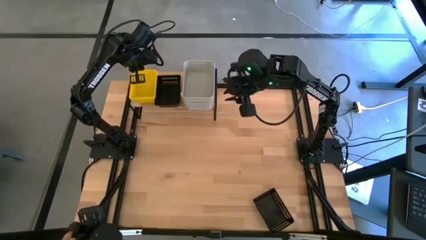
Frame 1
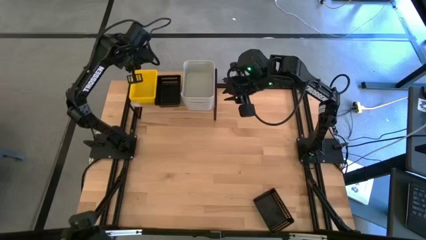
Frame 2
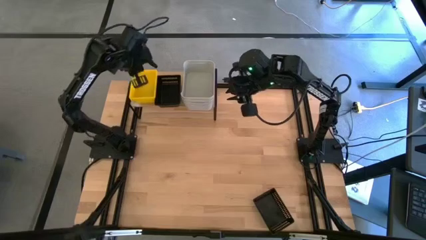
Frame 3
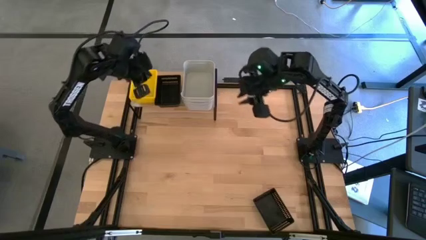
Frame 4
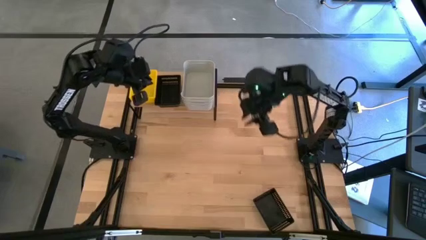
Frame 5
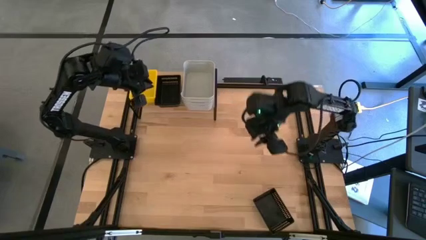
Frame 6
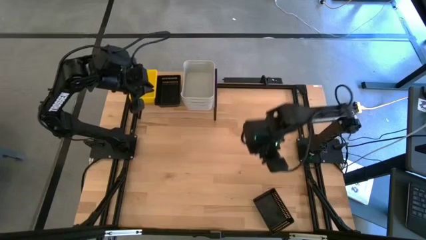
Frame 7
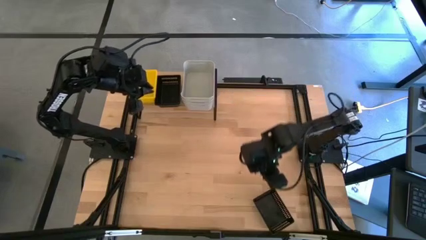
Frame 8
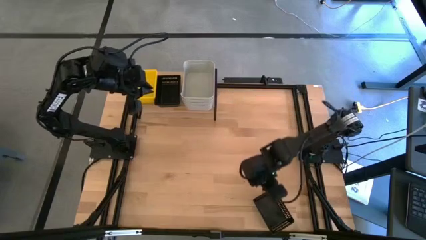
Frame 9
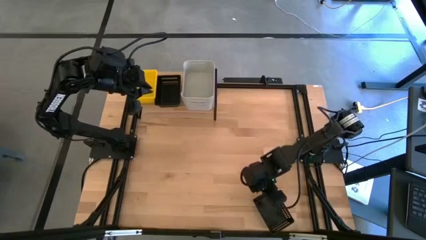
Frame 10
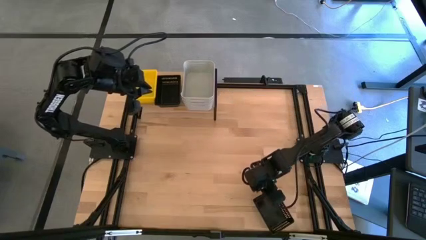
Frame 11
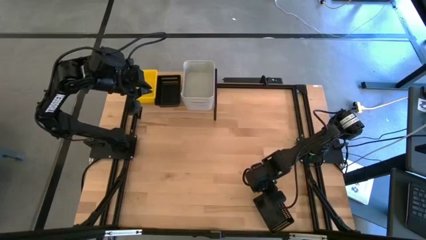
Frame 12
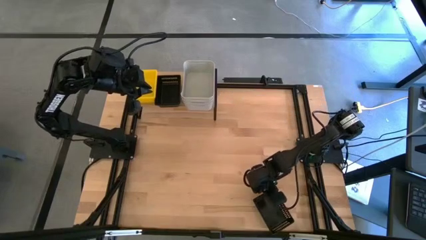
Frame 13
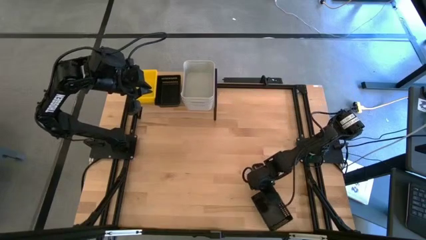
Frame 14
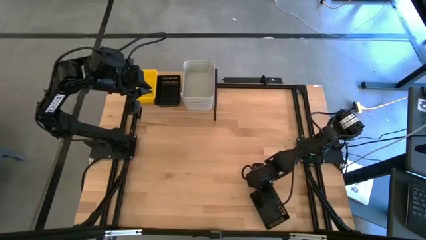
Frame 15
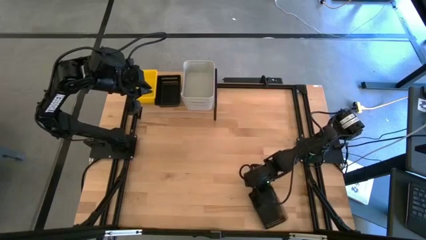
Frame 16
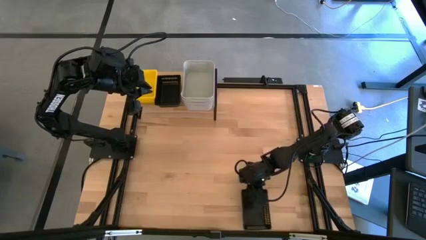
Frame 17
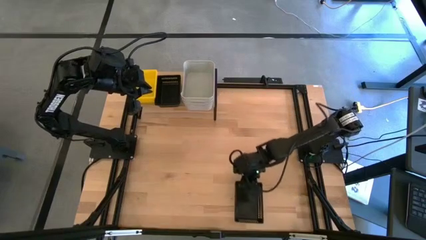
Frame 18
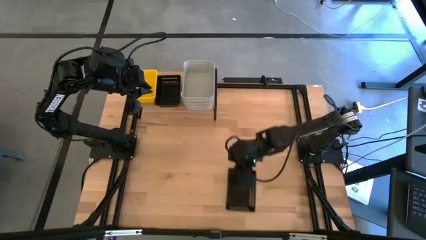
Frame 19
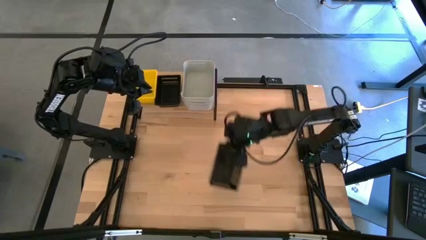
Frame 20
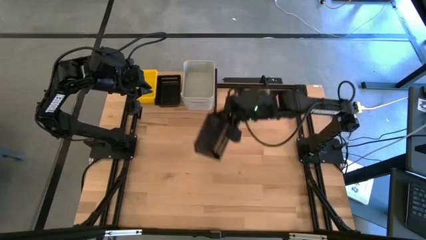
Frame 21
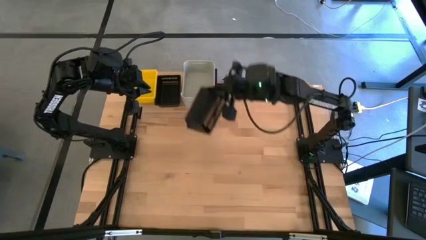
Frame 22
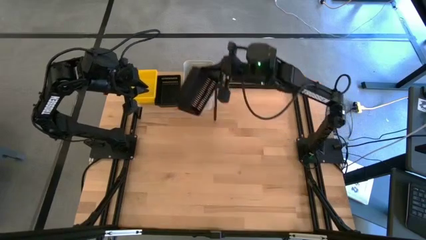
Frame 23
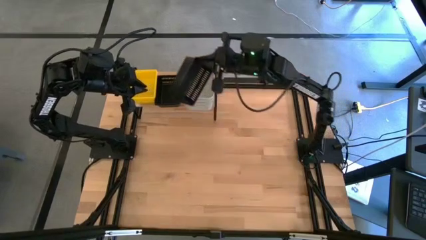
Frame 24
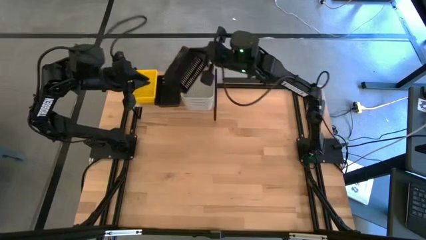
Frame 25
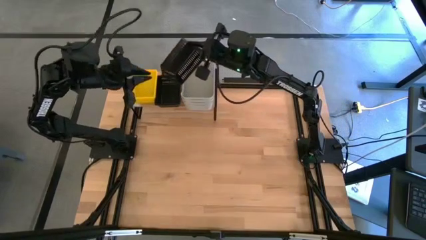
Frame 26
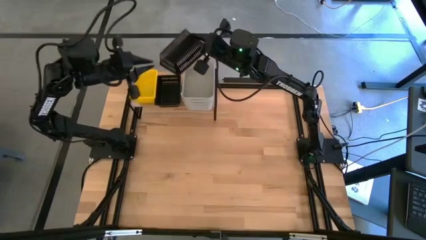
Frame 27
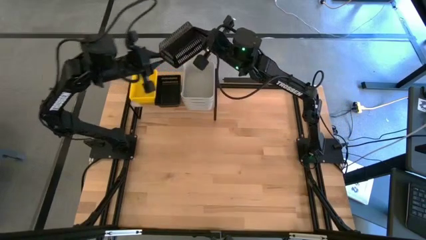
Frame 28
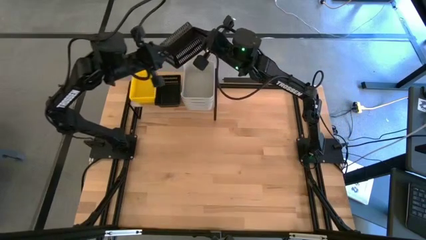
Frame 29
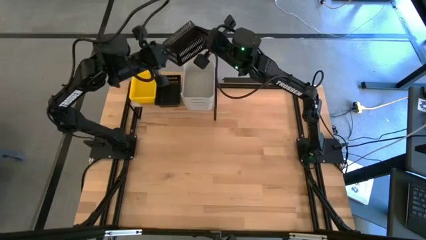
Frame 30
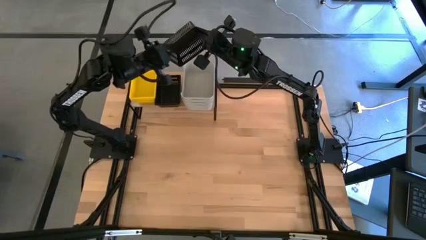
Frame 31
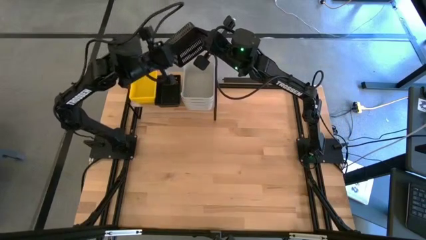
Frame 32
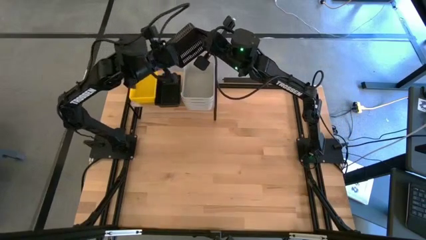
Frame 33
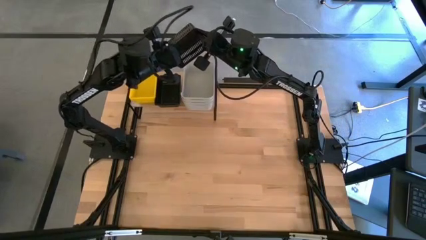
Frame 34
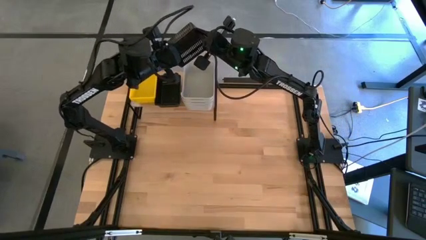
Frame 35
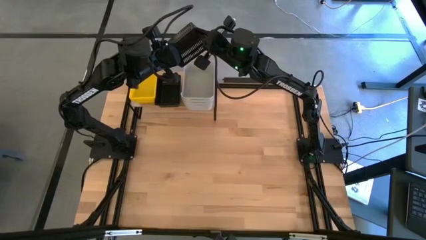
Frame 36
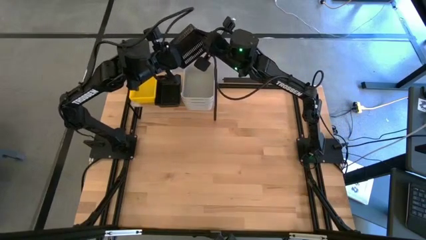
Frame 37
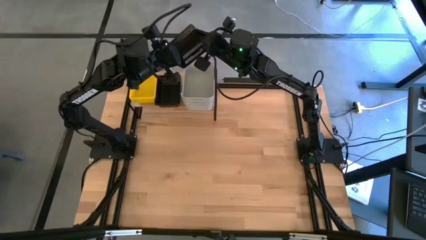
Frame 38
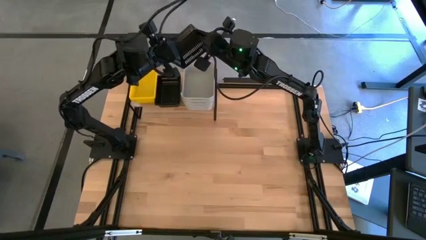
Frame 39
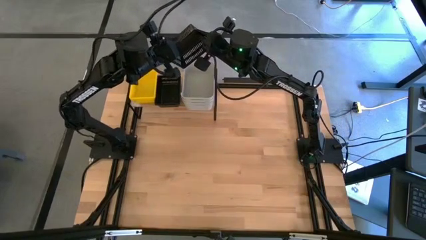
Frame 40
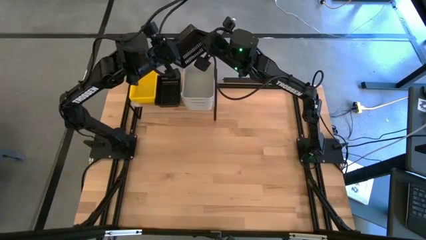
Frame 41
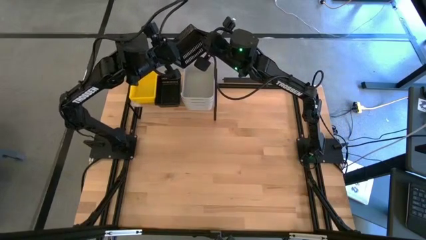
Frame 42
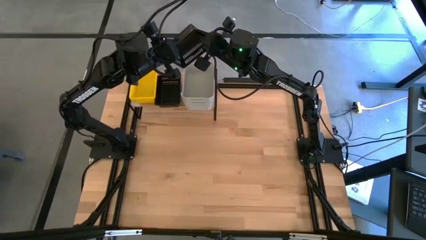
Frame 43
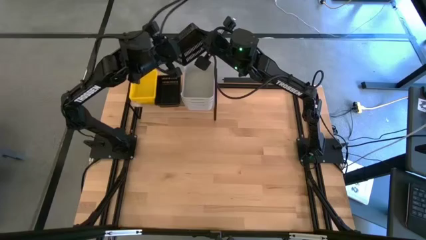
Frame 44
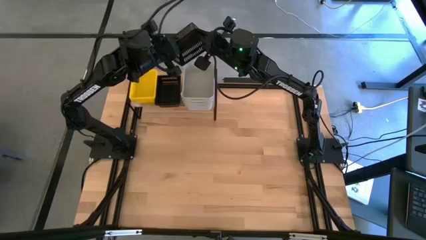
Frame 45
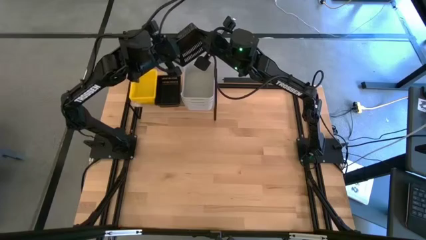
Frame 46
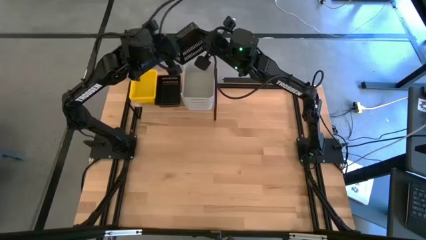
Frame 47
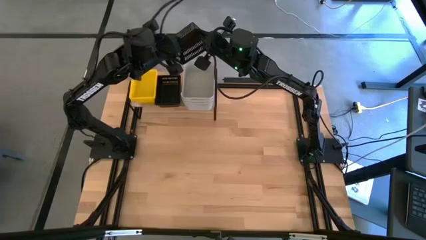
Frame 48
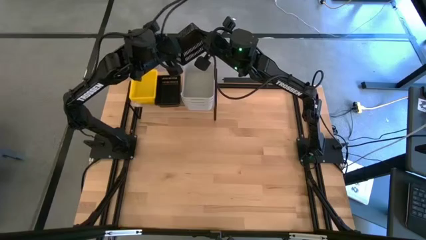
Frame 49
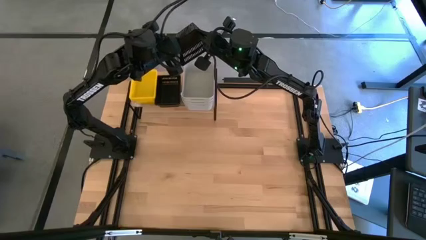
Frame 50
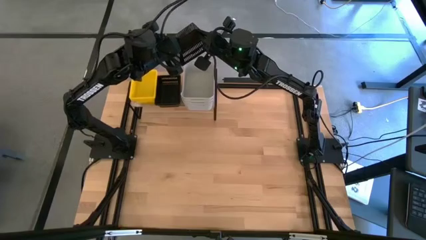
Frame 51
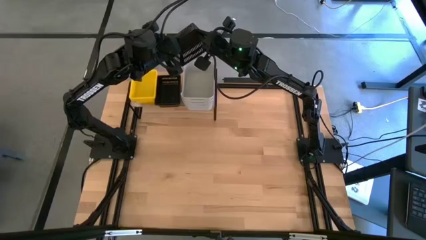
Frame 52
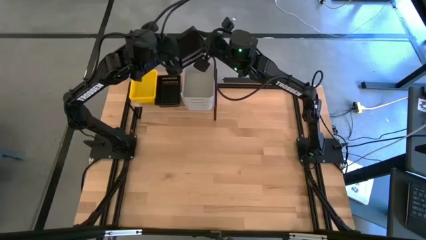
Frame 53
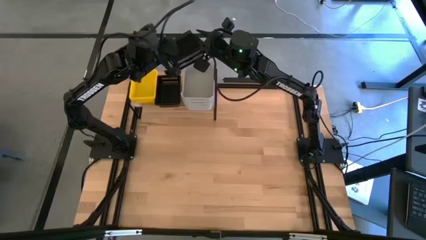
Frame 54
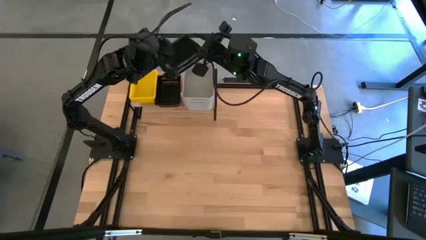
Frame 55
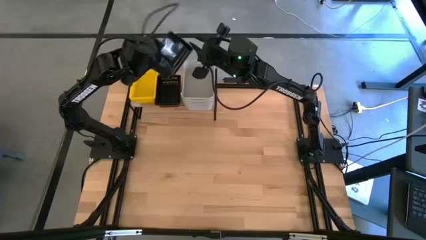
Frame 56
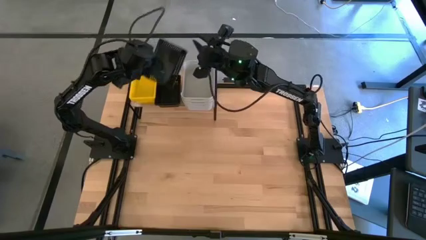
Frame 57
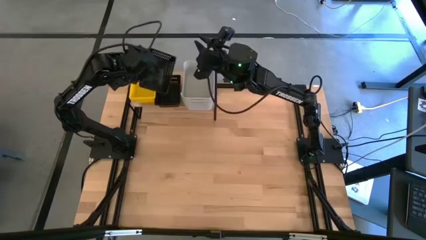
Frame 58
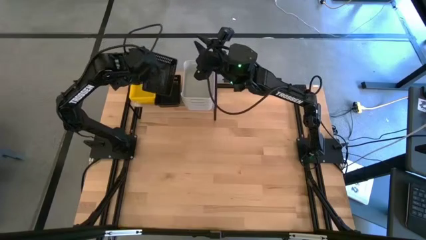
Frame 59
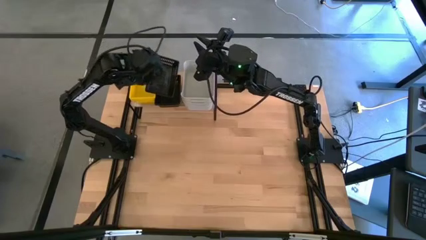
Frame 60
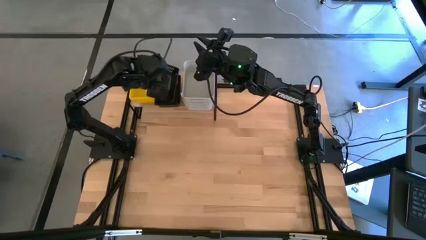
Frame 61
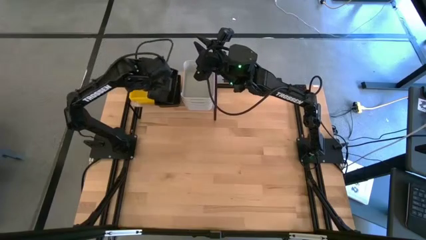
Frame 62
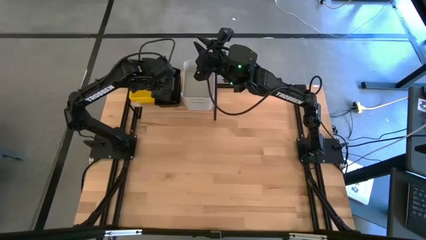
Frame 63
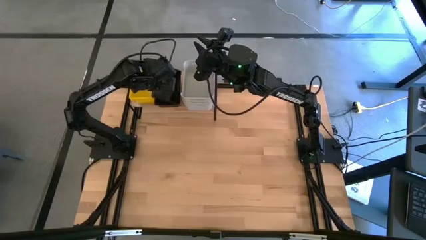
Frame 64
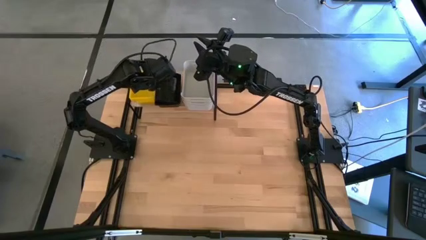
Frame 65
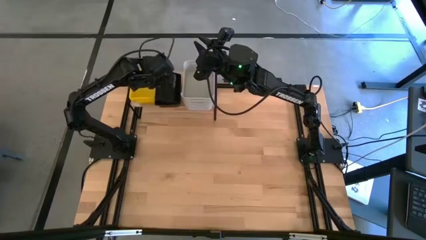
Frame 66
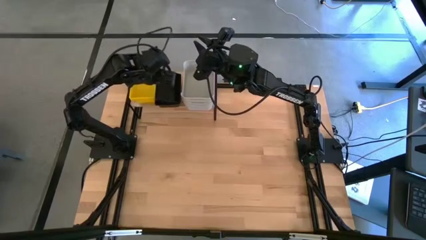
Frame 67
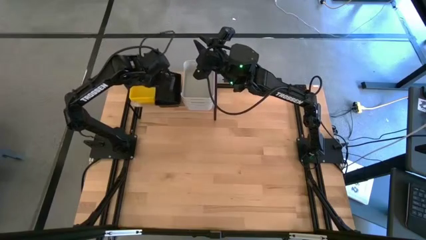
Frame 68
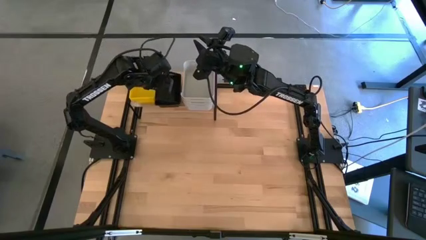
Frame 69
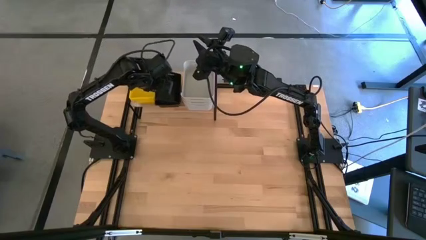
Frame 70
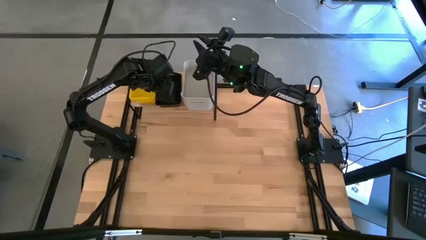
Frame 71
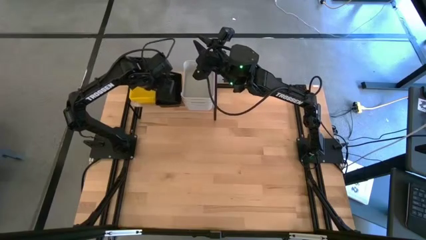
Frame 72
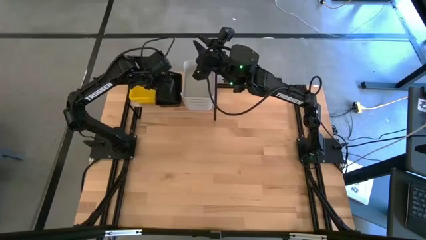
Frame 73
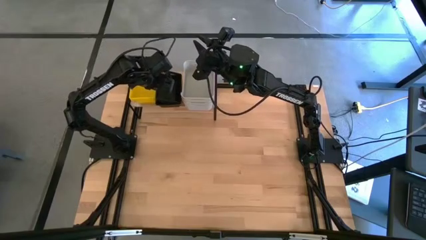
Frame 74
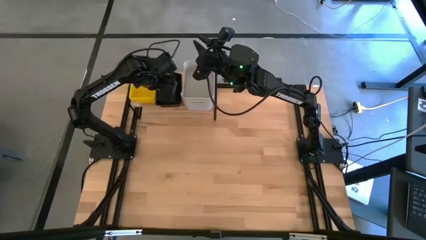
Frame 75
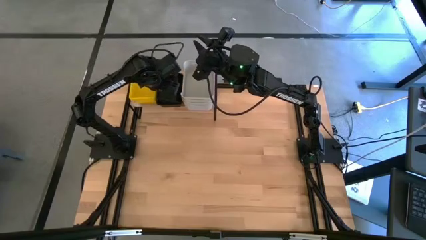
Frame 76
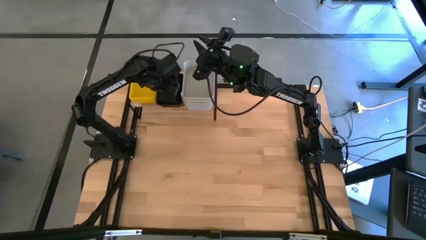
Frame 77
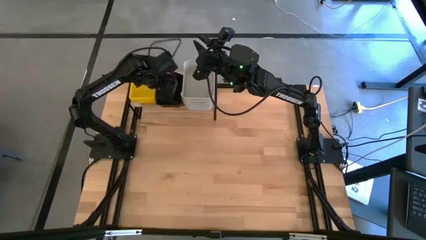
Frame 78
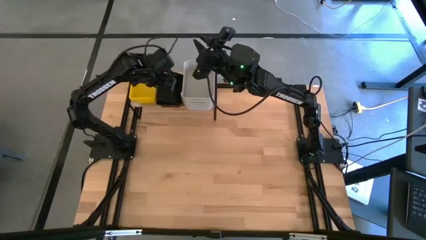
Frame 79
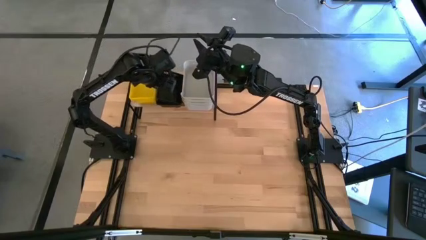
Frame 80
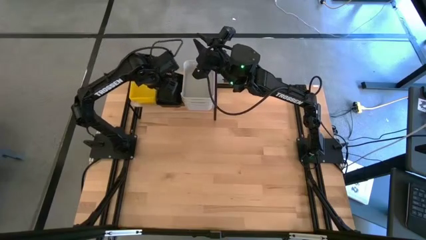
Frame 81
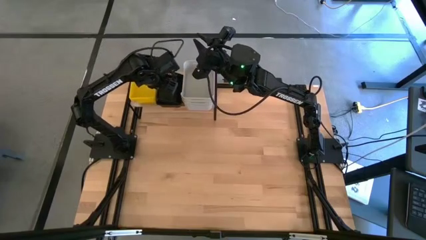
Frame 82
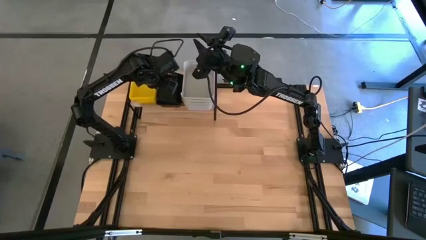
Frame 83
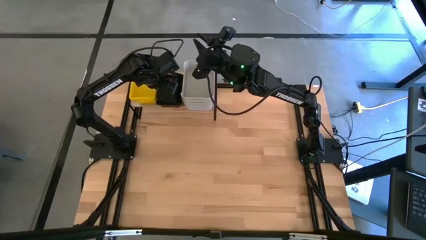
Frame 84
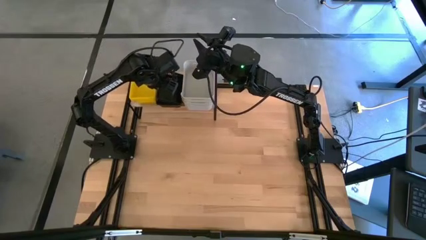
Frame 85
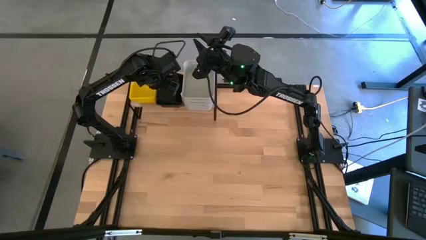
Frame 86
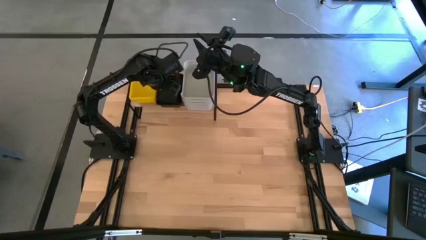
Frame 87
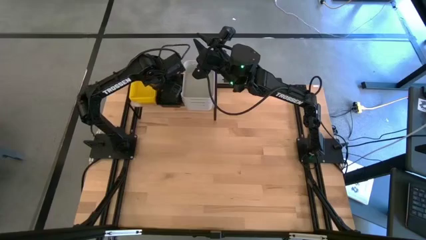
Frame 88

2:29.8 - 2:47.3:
Task: Stack baskets on shelf by color
Stack the black bin on top of the other black bin on the shelf
